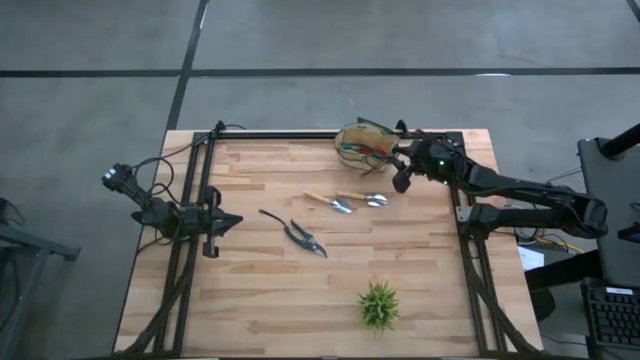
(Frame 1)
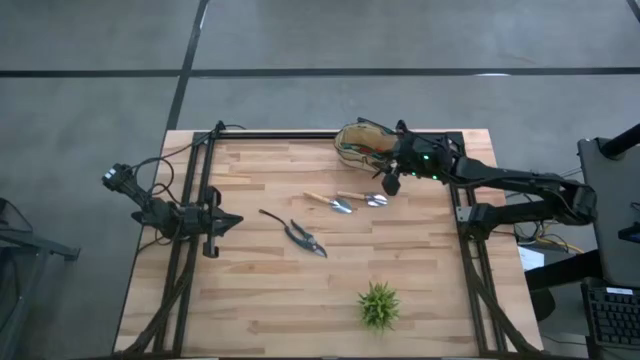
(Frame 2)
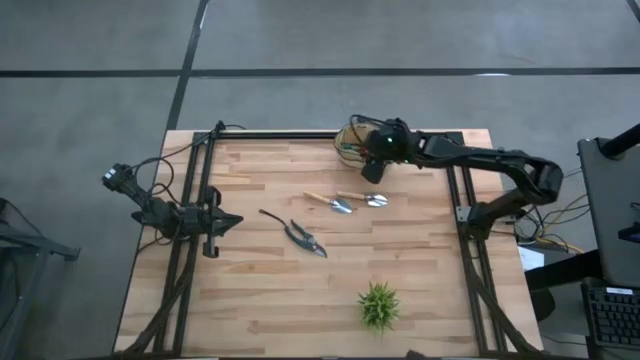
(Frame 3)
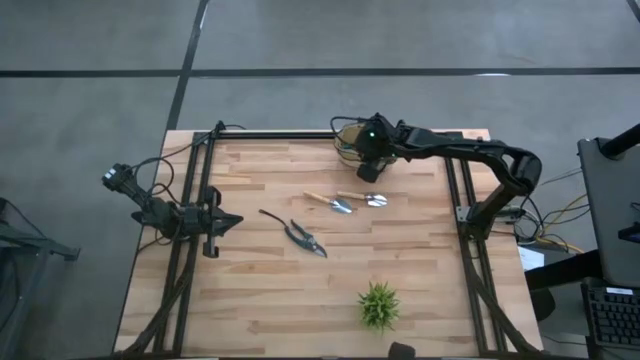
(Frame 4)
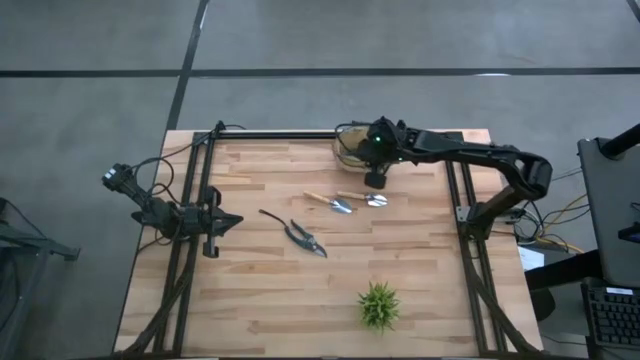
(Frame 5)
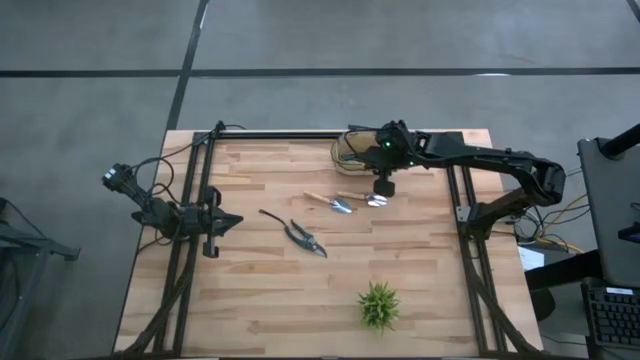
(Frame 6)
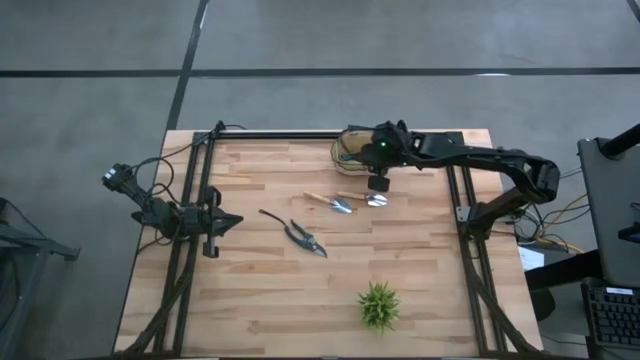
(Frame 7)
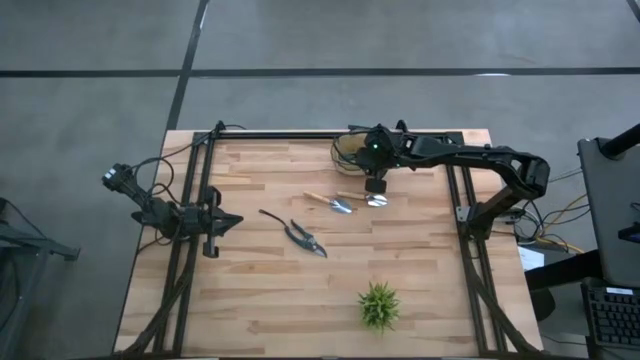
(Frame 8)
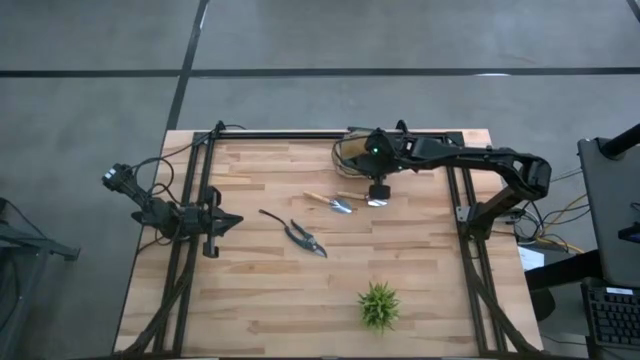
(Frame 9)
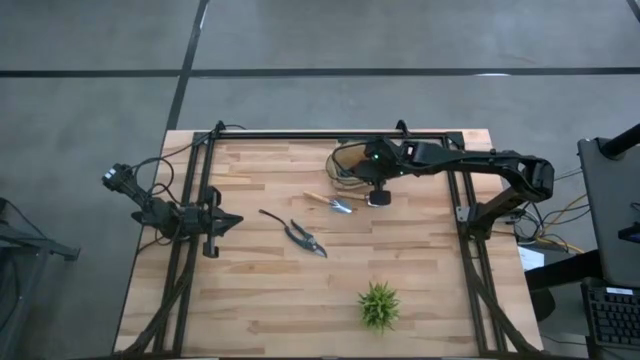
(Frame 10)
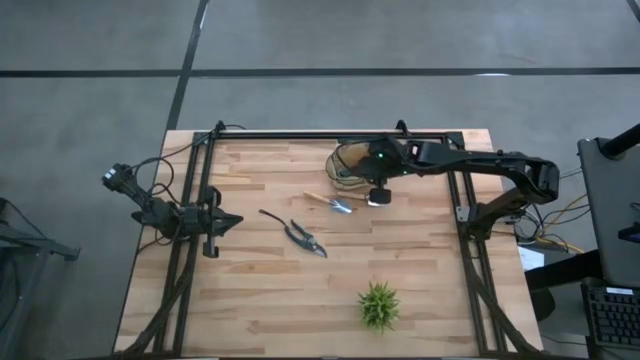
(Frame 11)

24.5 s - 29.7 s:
Task: Pick & Place Garden tools in Gardening bag
Adjust the gardening bag on the table

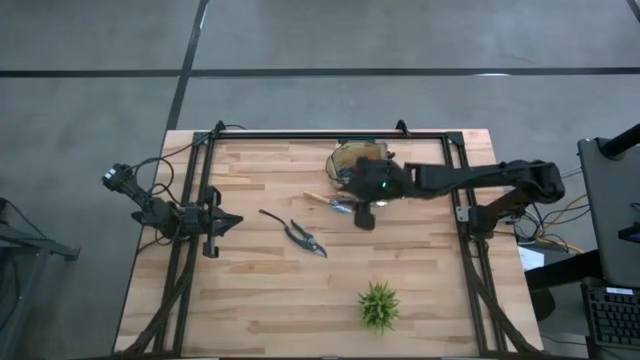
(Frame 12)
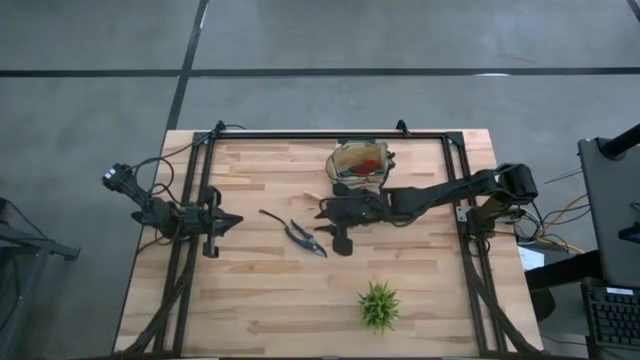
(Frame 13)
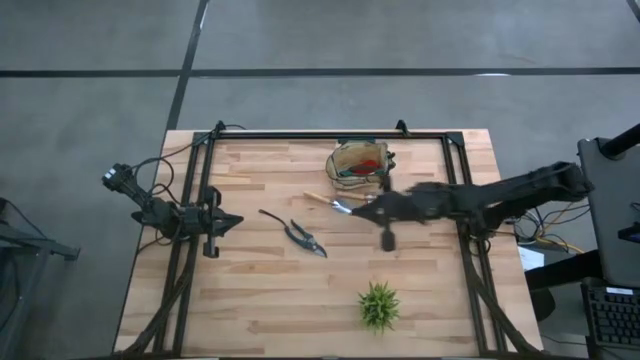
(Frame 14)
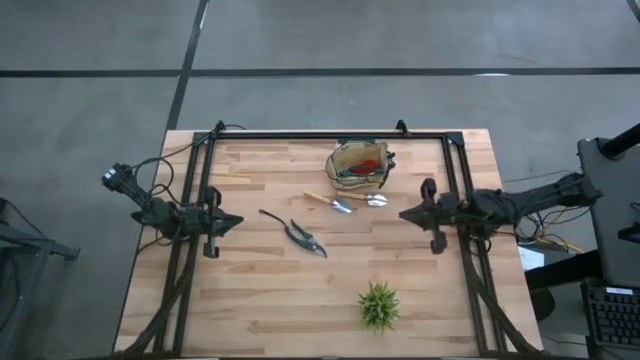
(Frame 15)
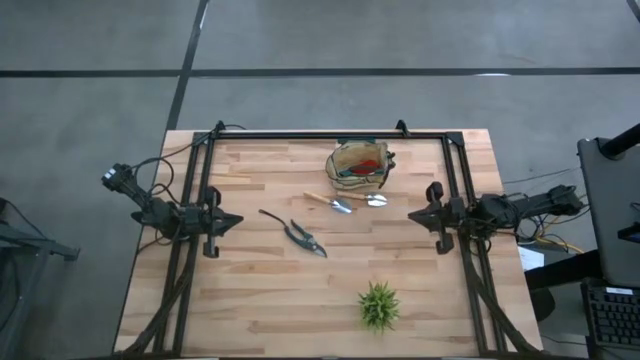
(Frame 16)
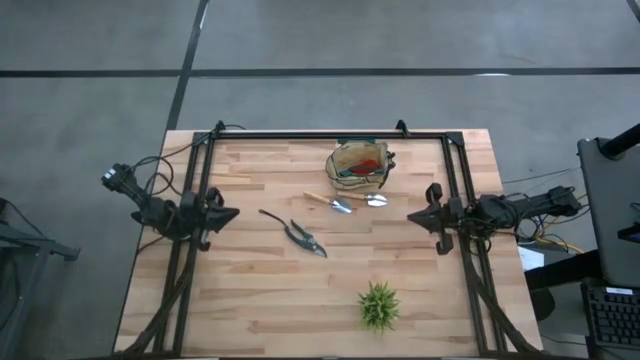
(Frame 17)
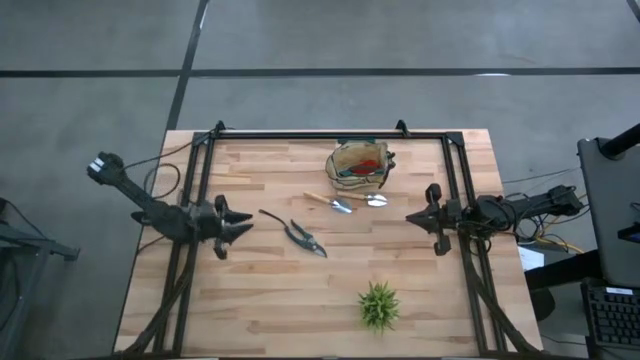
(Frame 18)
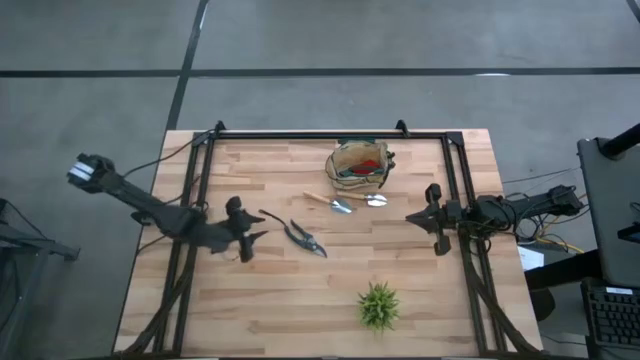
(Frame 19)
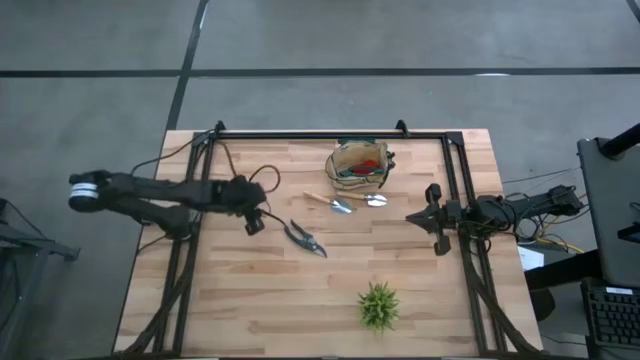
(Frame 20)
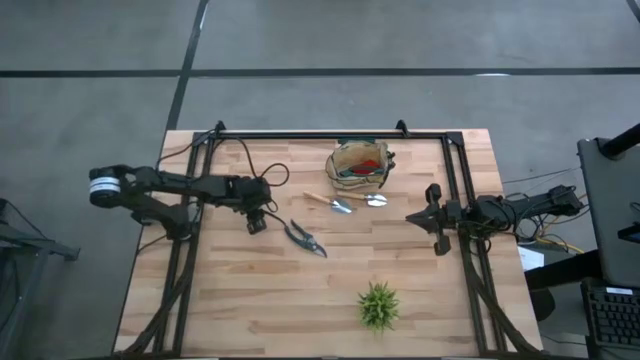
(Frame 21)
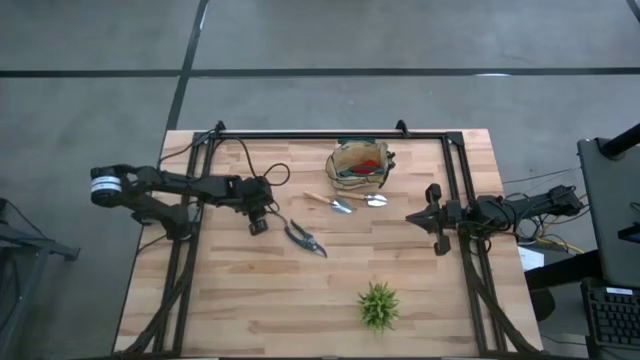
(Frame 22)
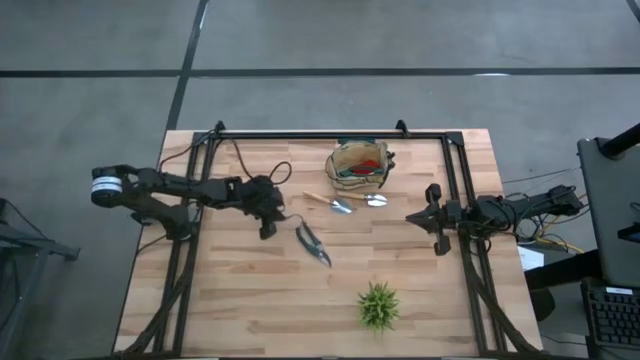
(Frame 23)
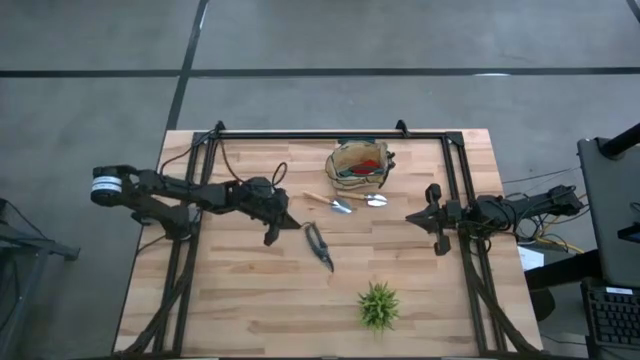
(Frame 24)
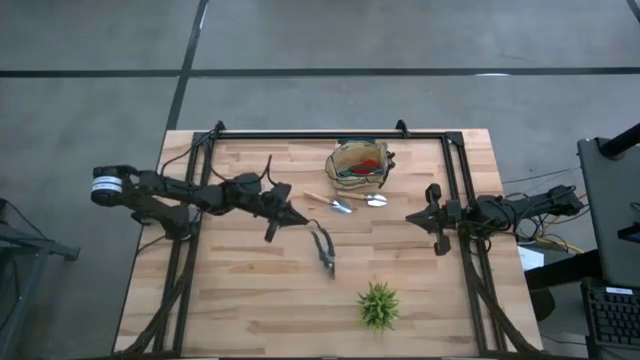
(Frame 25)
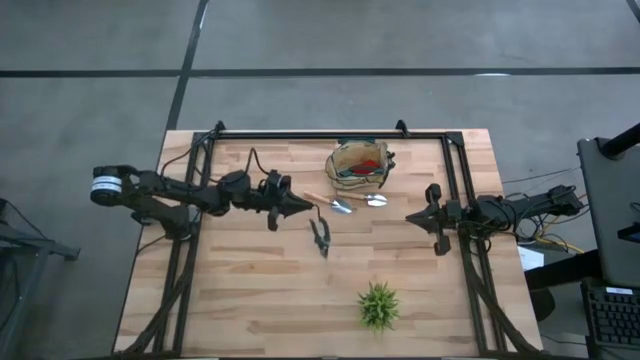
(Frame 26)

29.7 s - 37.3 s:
Put the green shear scissors into the gardening bag

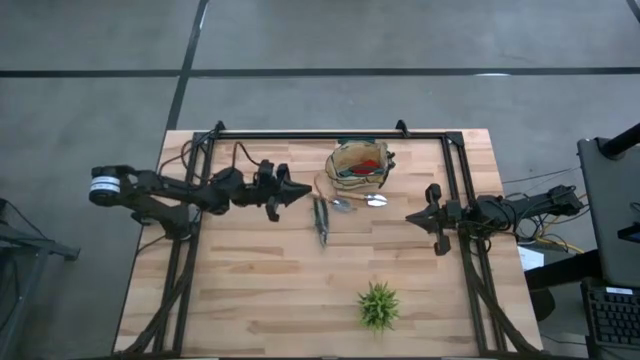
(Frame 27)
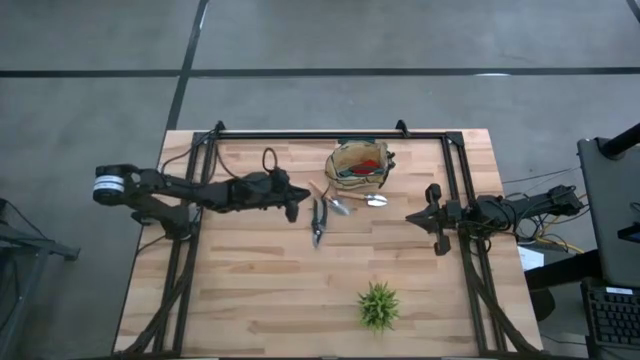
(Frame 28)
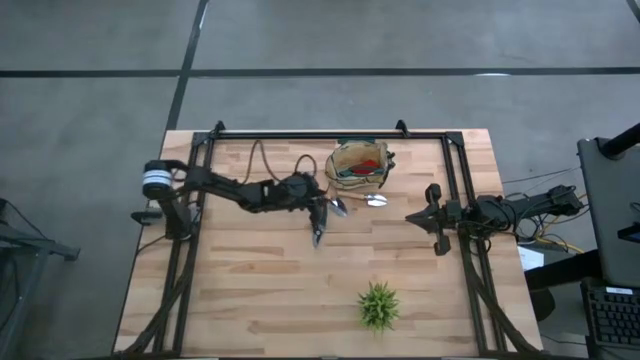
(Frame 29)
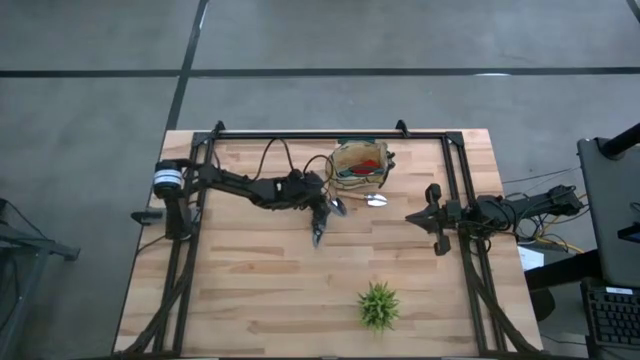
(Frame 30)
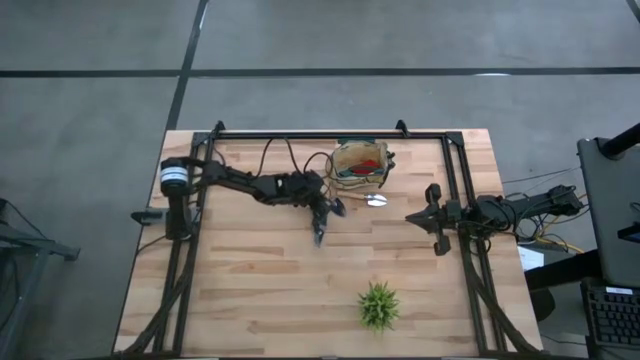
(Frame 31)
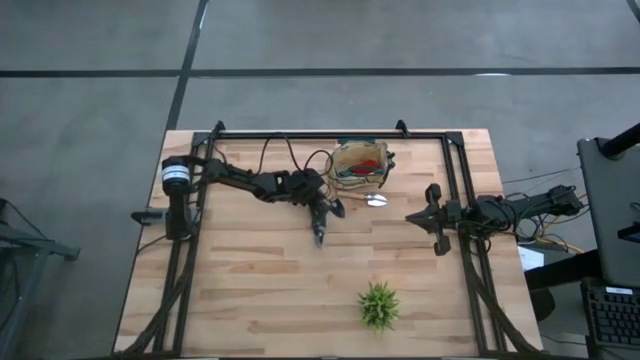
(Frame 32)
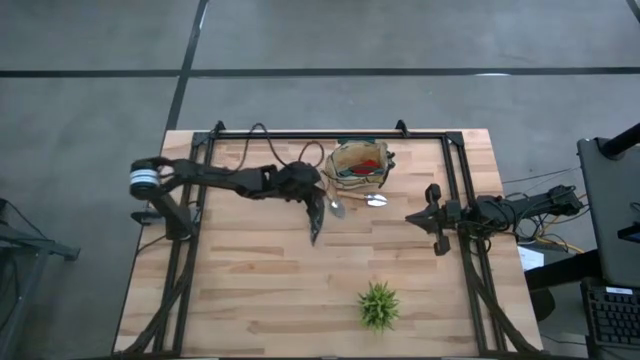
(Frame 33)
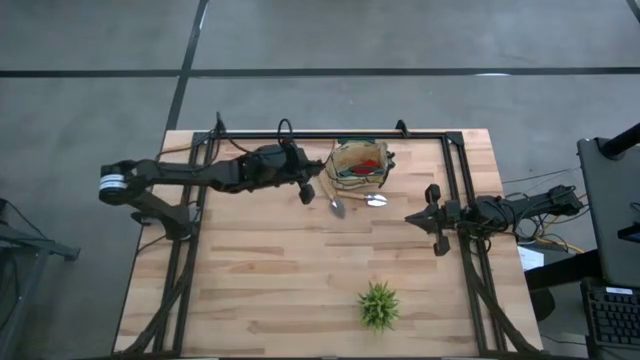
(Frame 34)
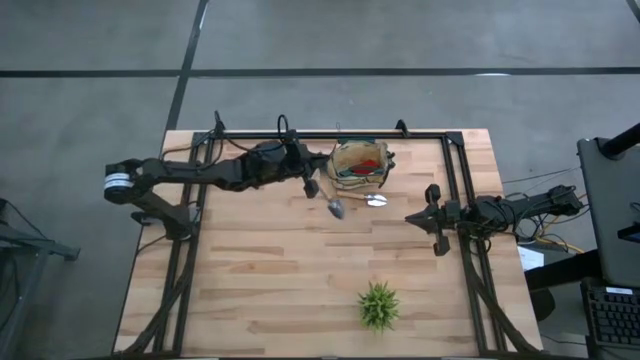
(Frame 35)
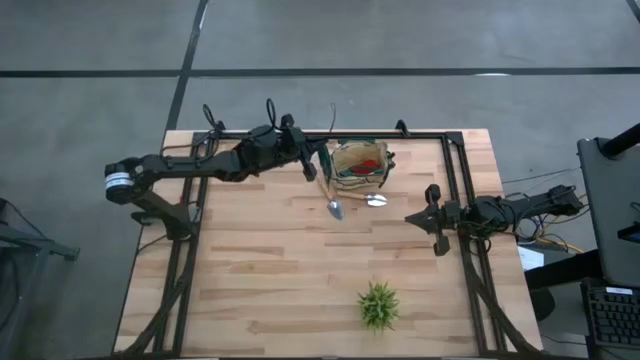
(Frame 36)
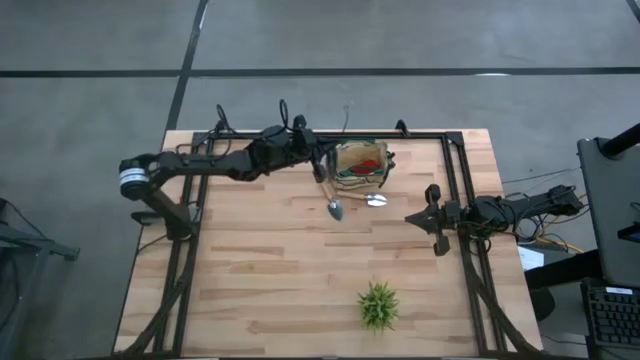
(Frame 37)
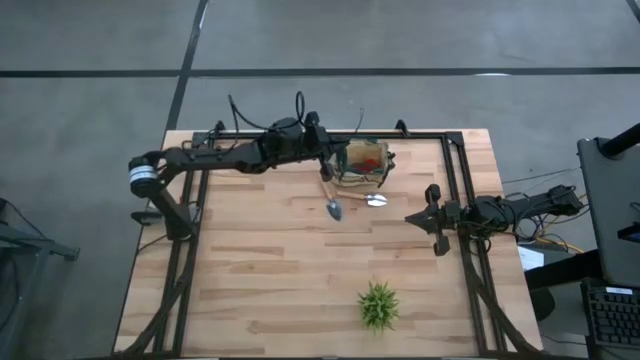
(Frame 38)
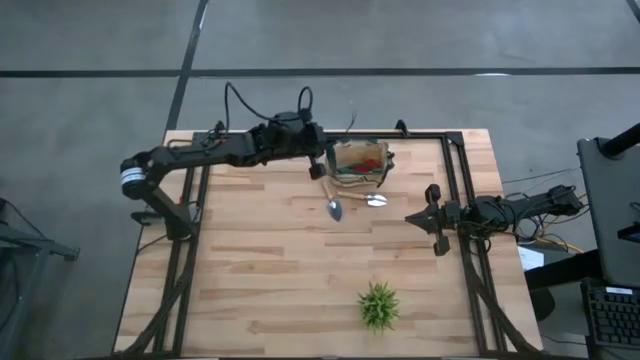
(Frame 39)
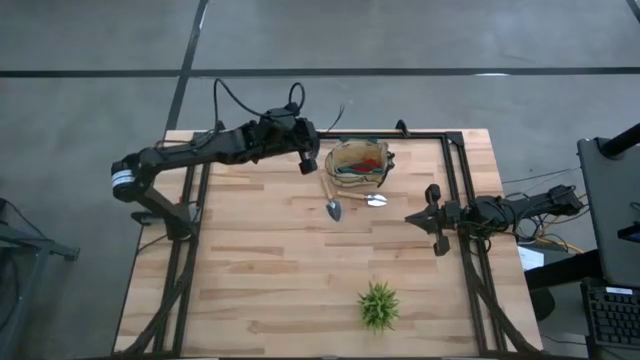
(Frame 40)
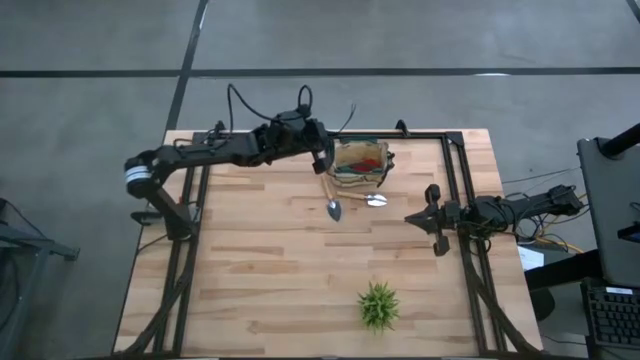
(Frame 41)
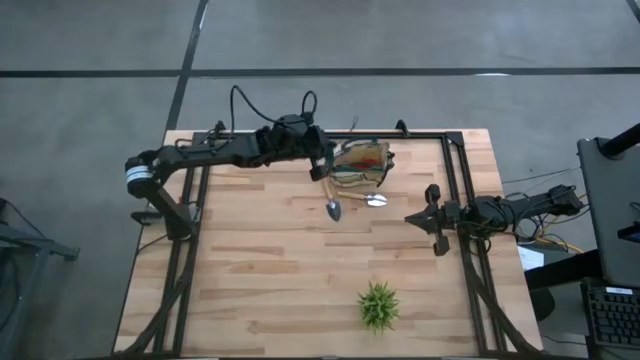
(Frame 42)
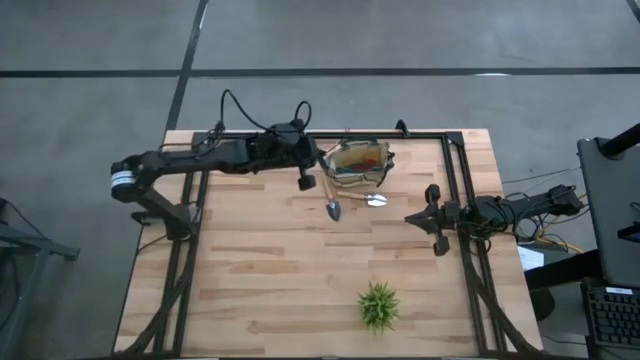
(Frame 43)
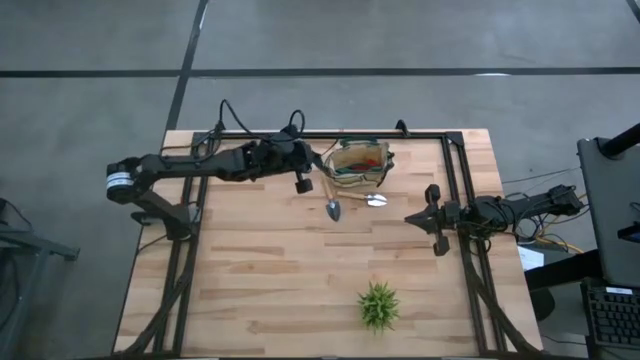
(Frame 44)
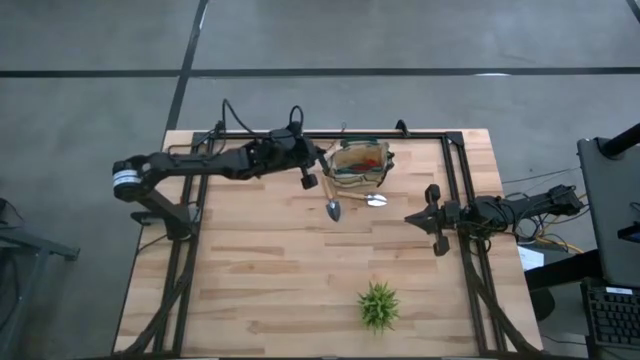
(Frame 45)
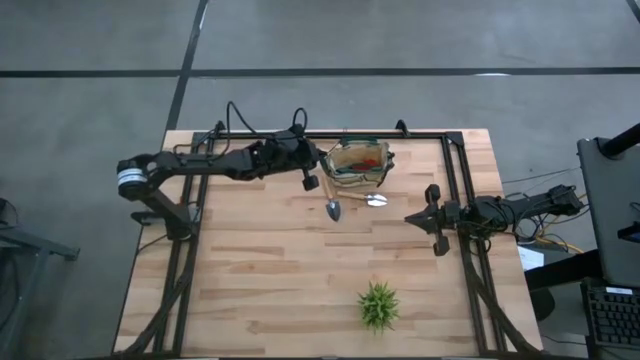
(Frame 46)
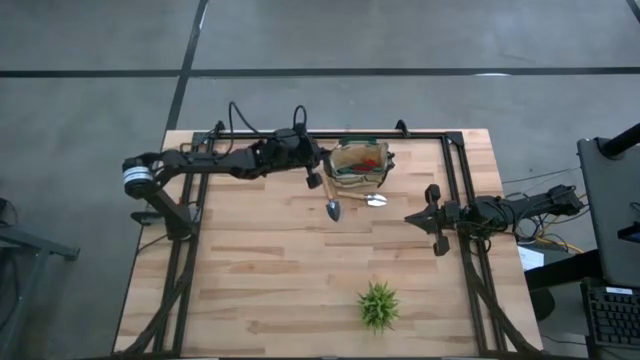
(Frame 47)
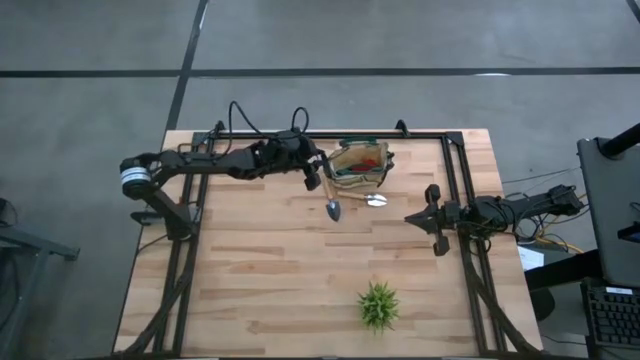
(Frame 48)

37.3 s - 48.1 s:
Put the green shear scissors into the gardening bag
